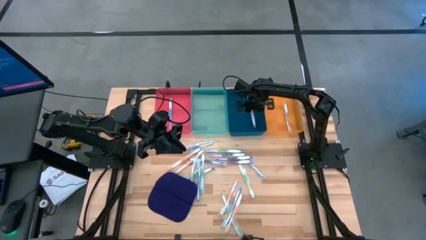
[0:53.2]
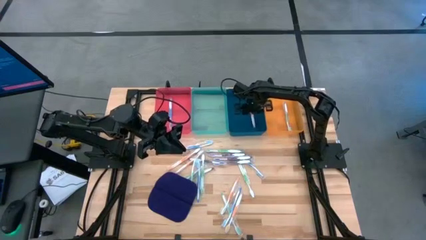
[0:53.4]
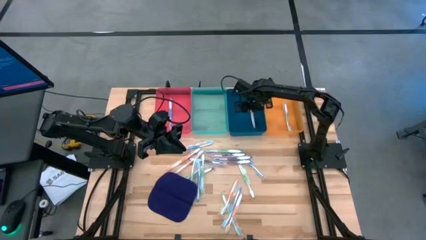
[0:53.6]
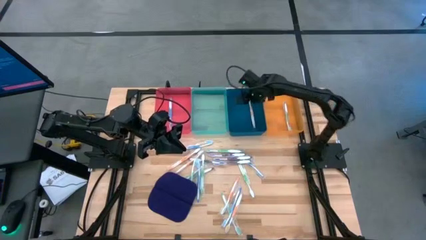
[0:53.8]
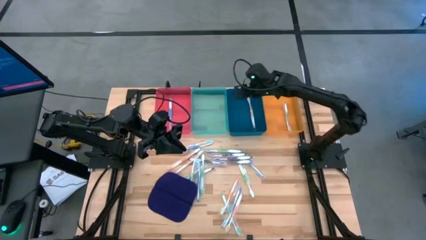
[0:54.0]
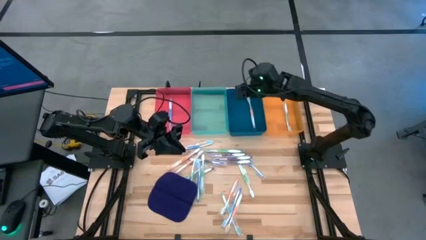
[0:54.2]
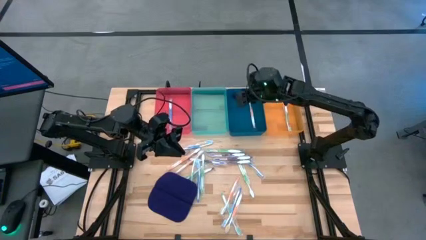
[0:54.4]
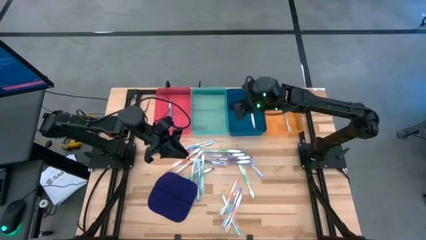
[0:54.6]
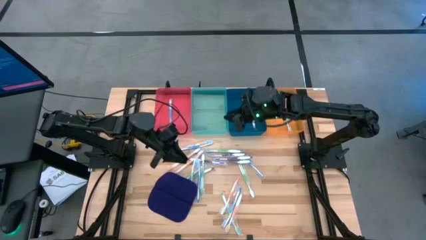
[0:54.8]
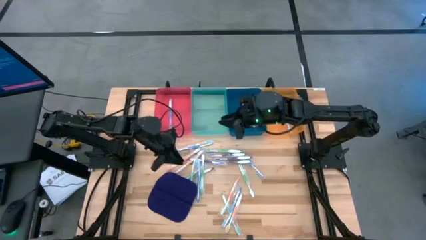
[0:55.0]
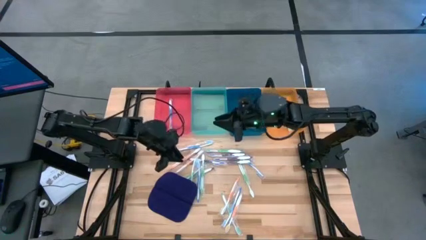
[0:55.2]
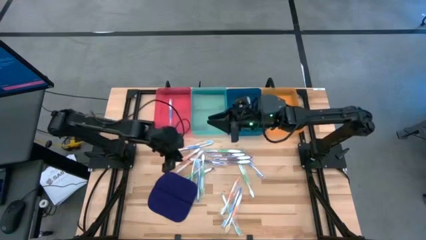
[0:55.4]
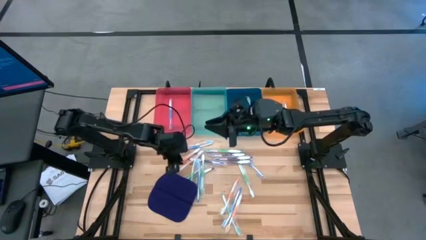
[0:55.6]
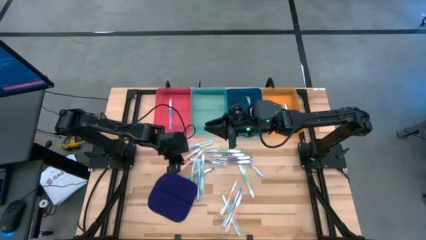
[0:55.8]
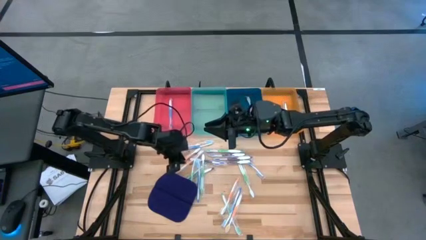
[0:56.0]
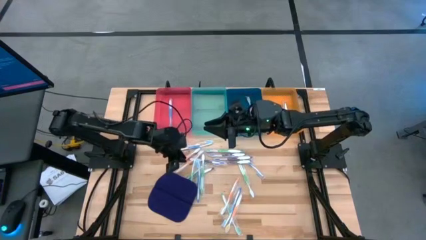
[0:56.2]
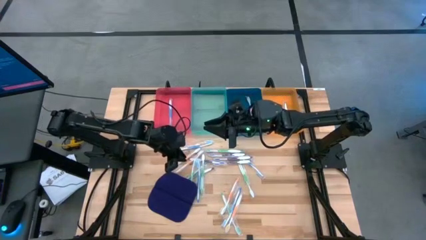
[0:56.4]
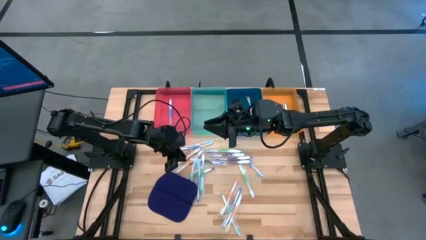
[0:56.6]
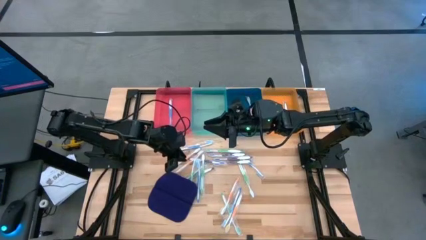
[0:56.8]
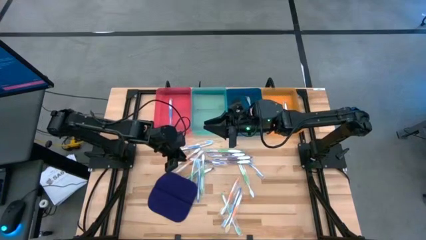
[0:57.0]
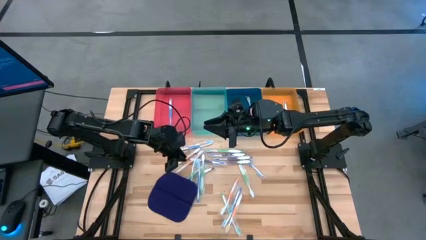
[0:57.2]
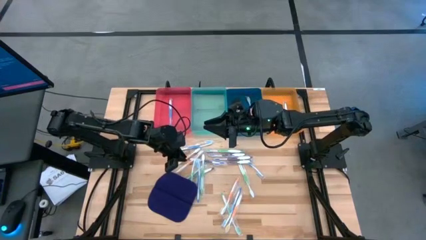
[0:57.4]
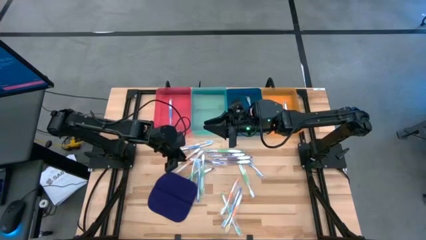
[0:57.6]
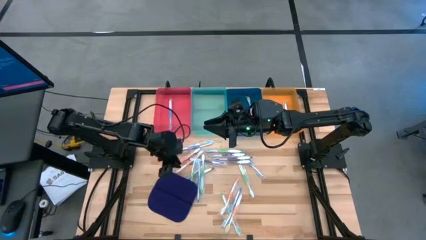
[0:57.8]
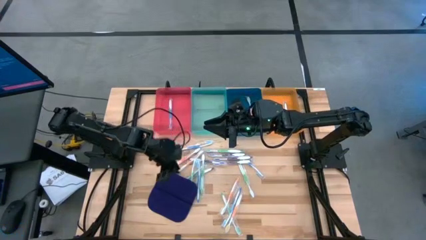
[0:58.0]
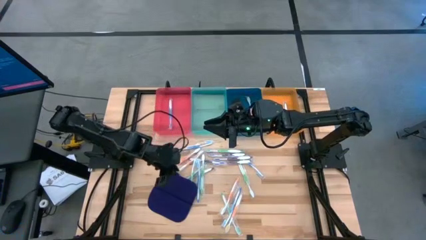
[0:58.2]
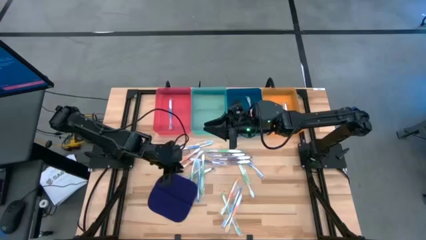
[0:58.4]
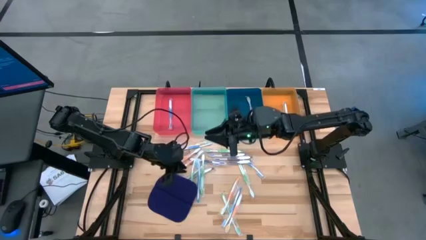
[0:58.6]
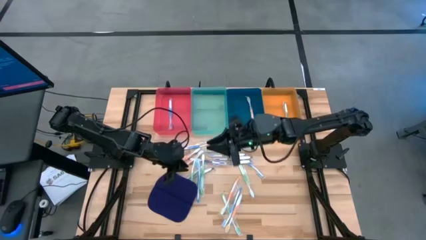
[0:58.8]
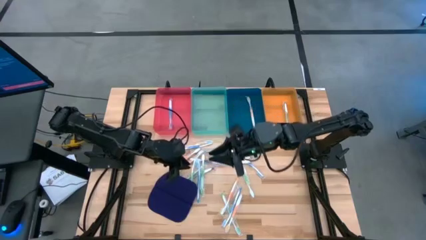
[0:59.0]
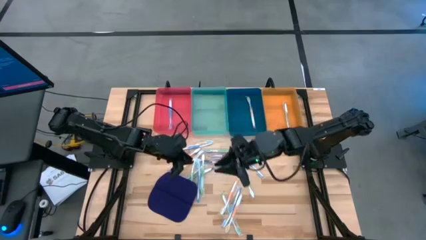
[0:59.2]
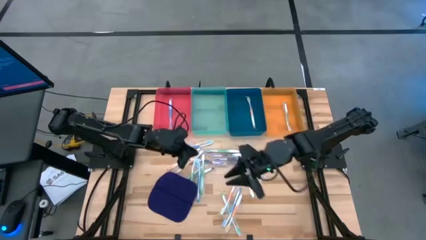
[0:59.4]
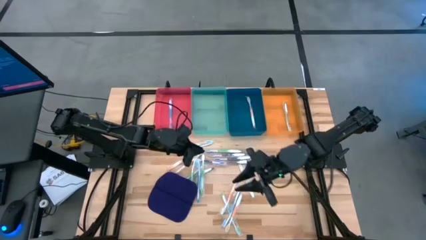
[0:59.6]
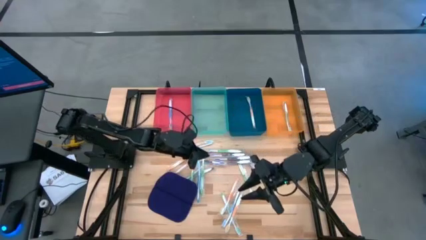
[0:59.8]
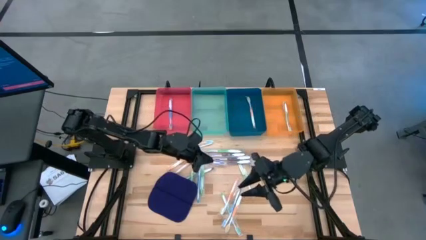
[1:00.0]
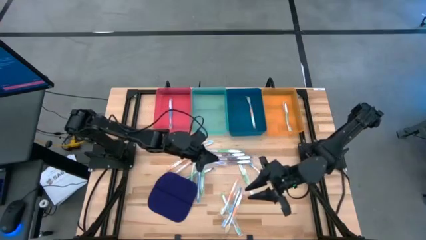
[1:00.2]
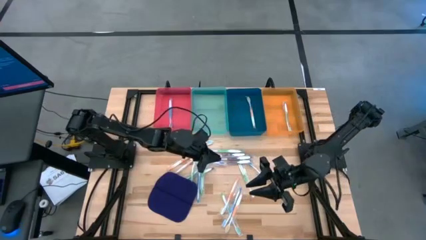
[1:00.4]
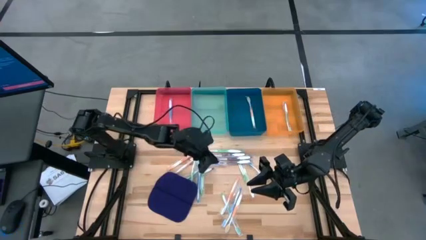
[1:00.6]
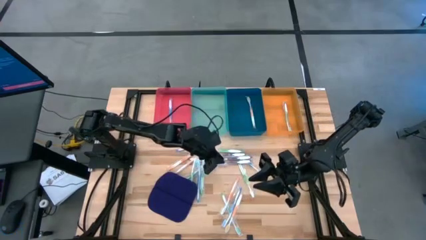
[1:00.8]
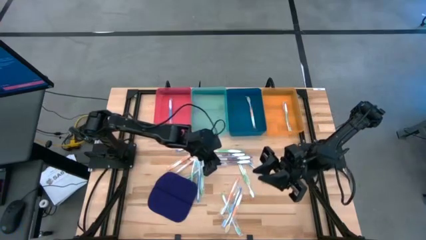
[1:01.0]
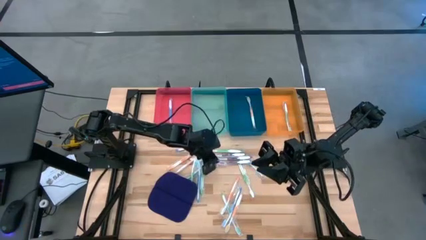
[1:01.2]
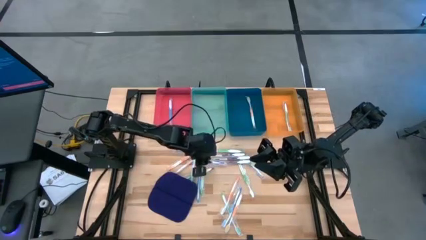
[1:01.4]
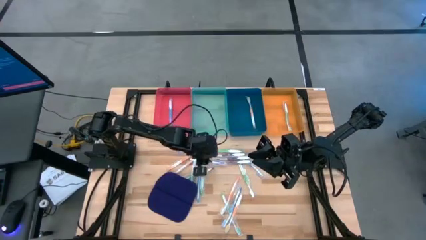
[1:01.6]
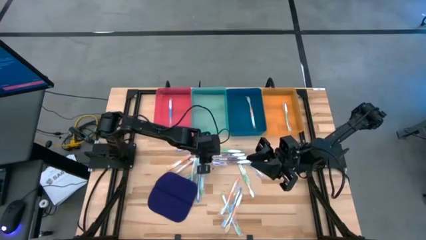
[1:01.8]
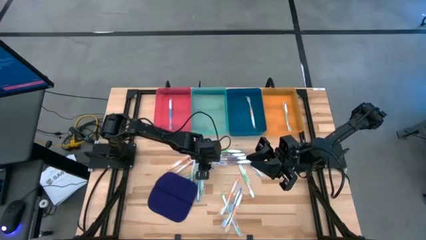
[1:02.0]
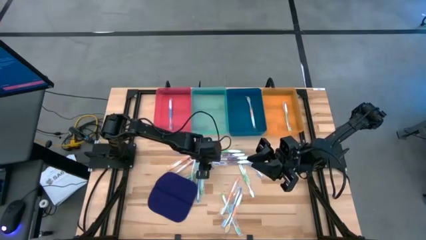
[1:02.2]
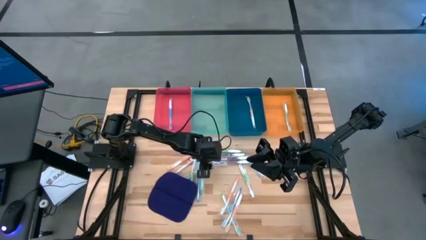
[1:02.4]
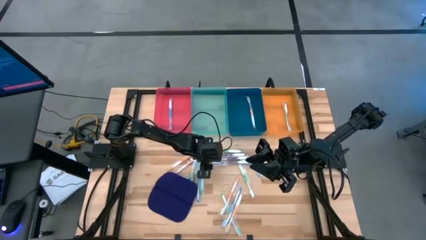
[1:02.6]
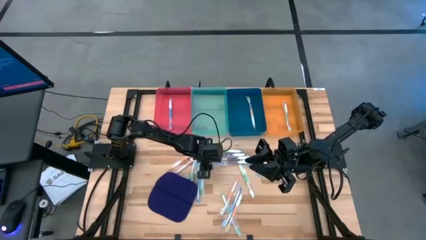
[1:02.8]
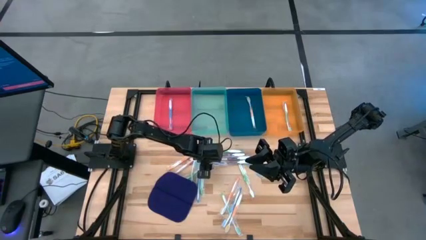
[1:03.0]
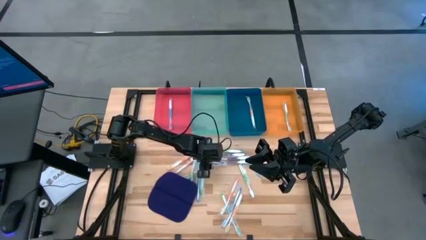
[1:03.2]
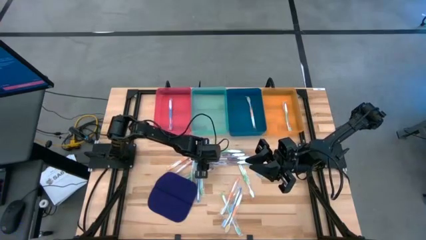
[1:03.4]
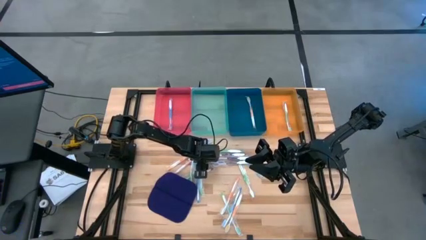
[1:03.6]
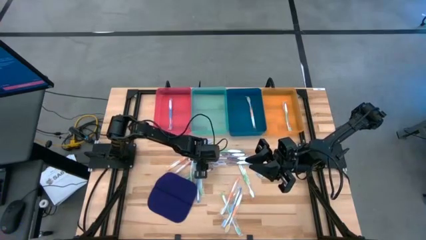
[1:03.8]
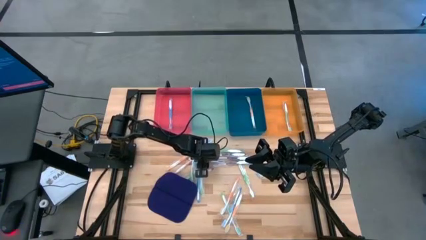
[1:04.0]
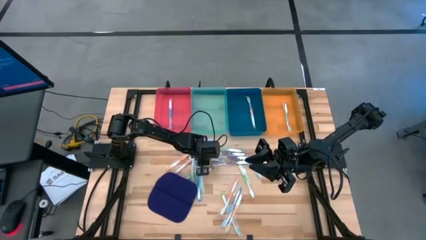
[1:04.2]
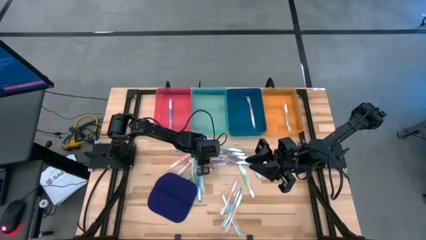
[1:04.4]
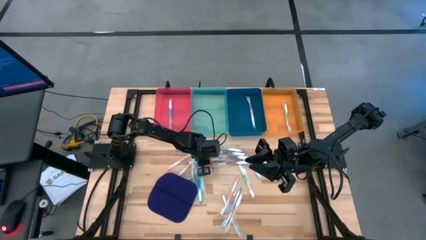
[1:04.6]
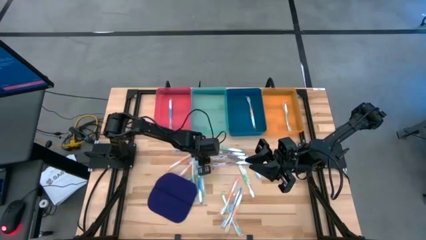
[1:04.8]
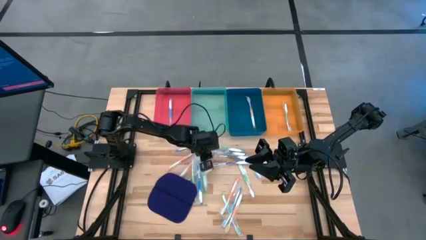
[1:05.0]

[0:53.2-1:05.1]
Task: Pick & Place Toothbrushes
Put the purple toothbrush into the green bin

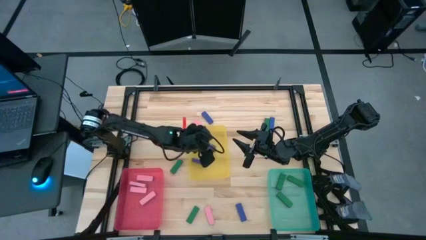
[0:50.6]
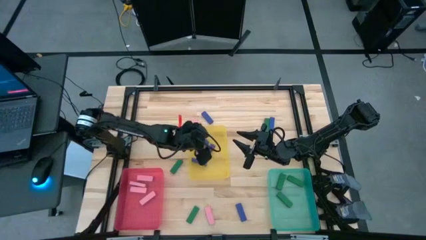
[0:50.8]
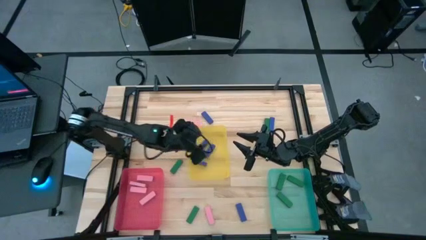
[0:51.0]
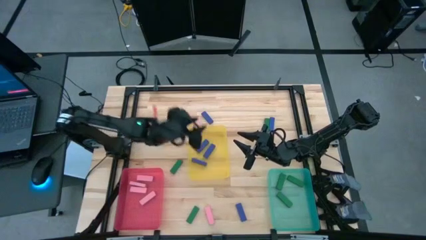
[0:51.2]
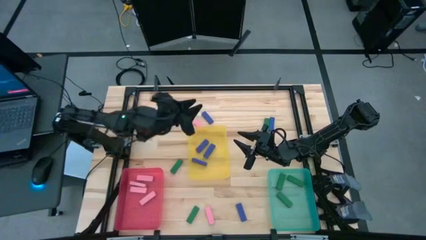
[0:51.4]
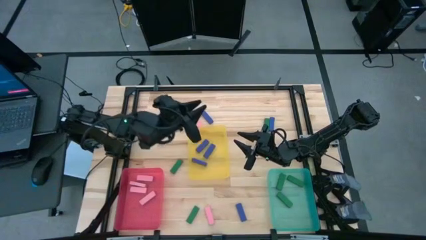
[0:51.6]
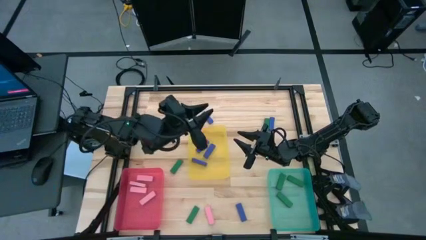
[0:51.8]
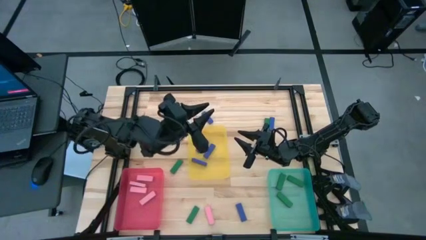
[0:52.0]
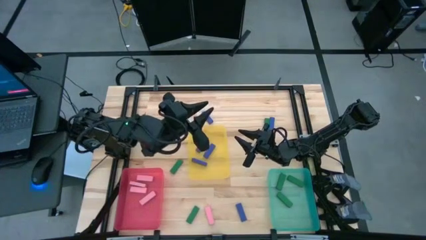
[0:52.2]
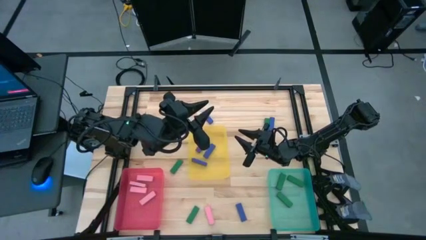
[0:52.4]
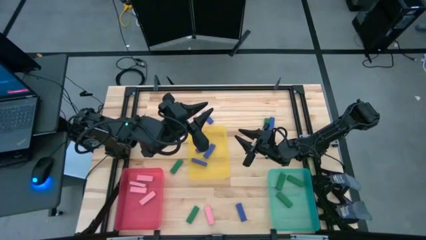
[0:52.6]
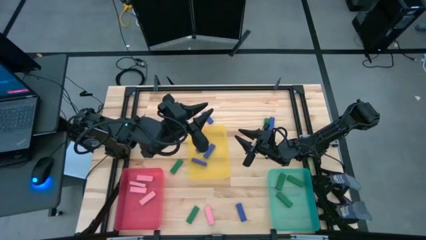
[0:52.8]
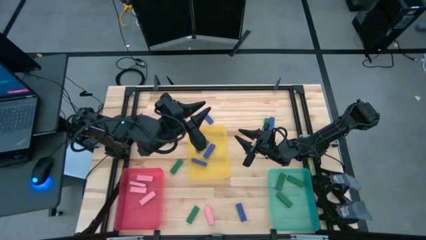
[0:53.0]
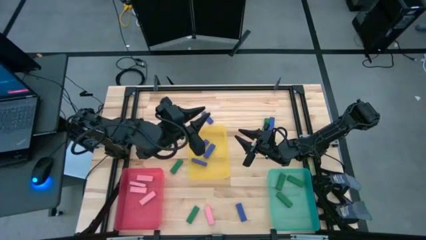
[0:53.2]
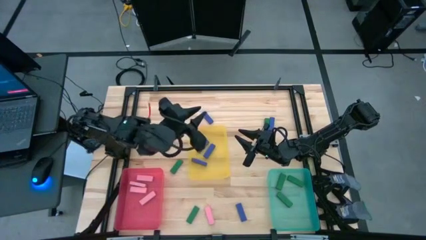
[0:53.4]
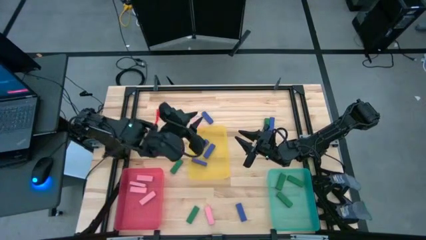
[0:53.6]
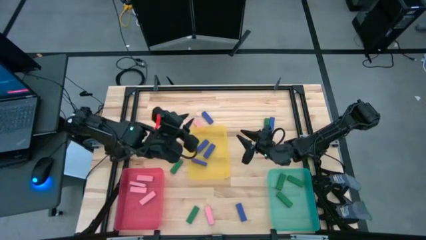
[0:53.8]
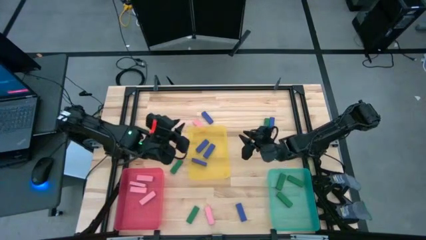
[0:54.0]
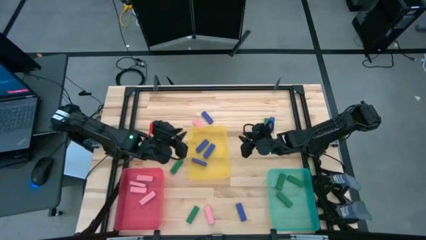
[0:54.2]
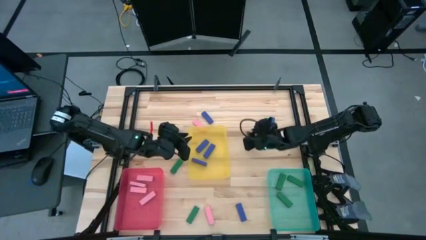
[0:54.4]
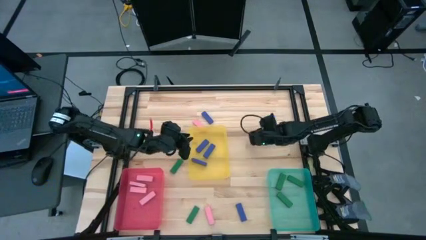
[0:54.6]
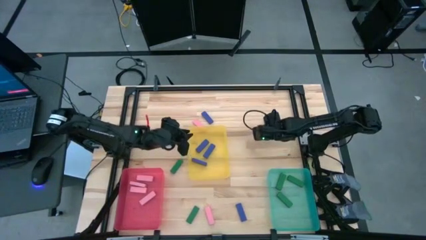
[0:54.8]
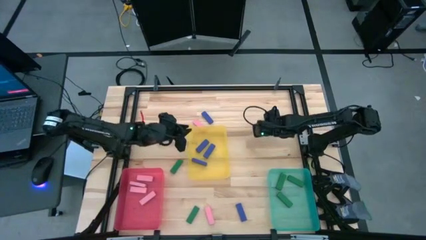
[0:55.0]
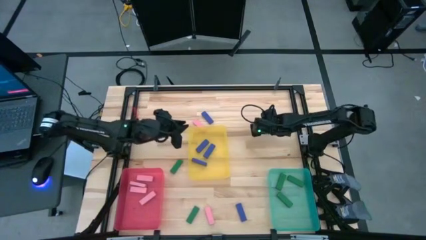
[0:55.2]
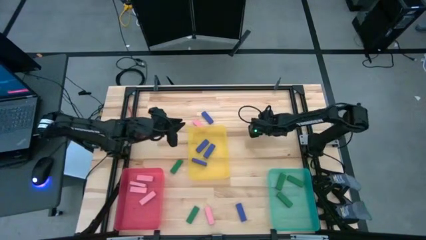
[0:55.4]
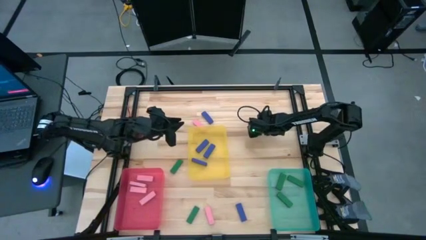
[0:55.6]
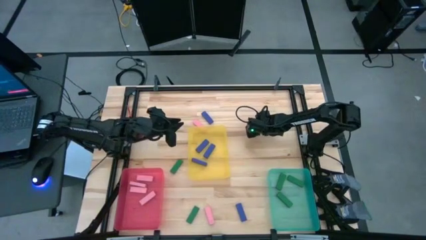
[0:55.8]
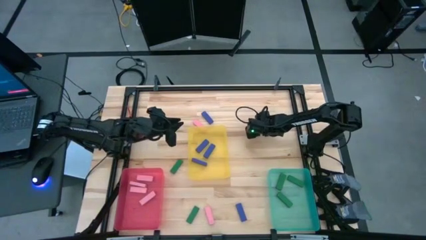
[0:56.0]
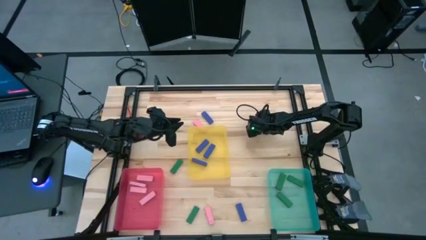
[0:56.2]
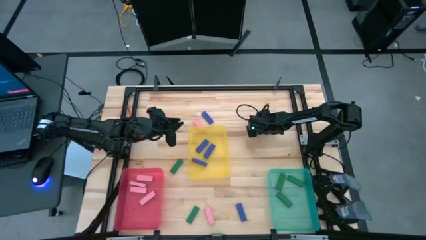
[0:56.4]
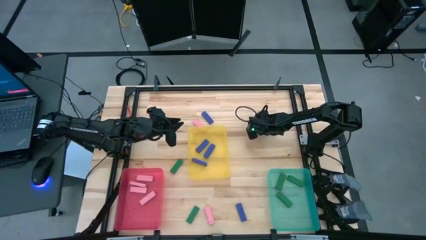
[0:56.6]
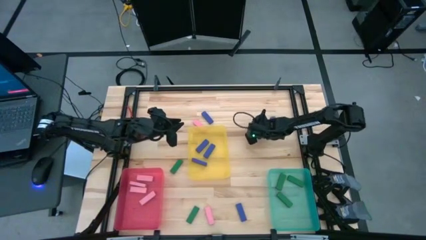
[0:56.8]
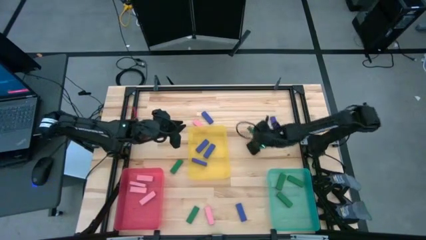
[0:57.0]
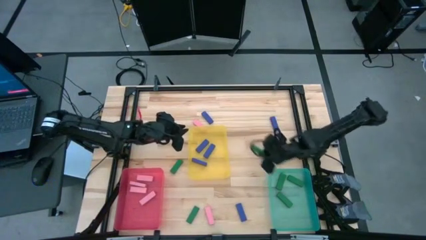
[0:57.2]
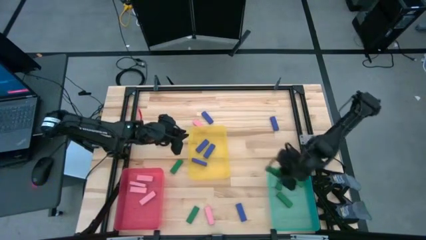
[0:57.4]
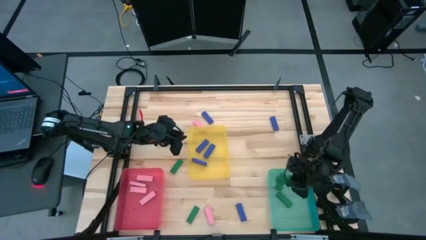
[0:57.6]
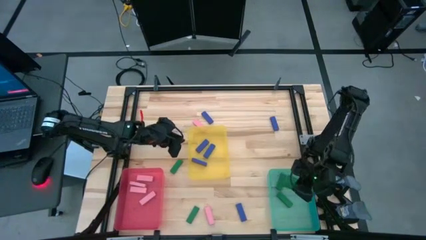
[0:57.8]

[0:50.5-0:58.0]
Task: Sort blocks
Put the top right green block into the blue bin
